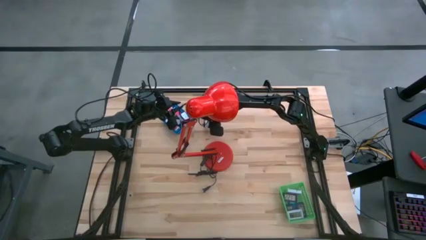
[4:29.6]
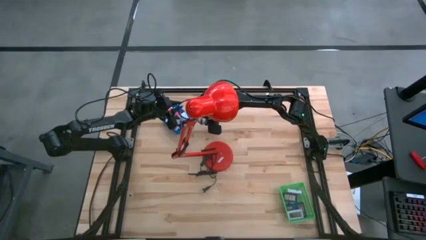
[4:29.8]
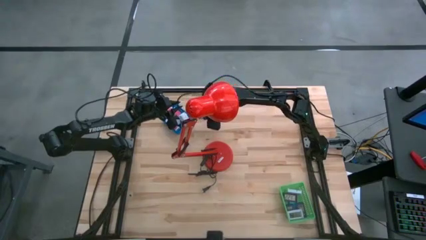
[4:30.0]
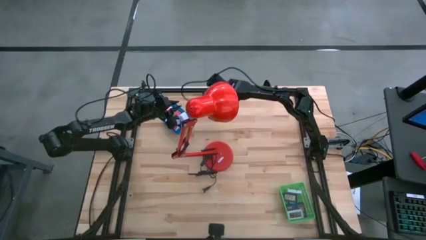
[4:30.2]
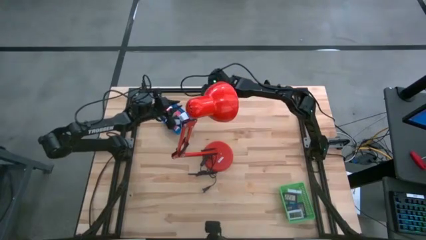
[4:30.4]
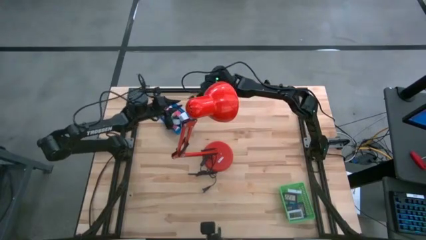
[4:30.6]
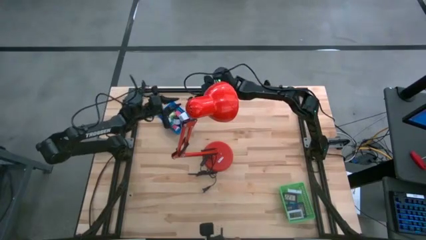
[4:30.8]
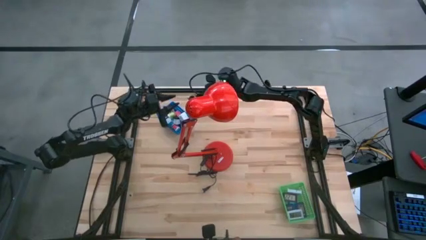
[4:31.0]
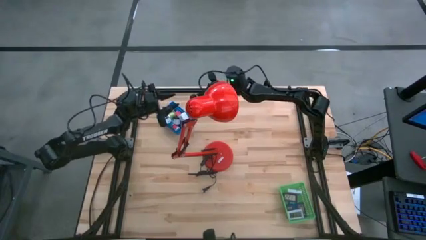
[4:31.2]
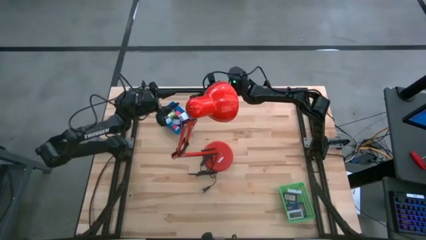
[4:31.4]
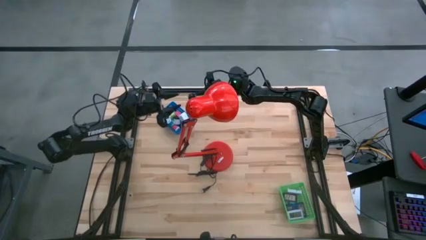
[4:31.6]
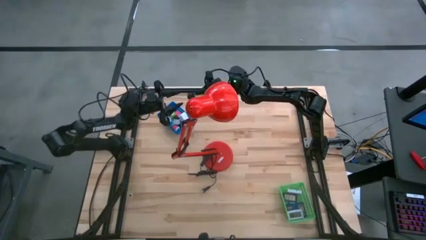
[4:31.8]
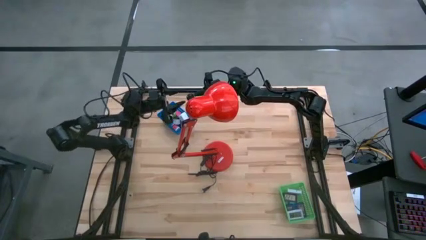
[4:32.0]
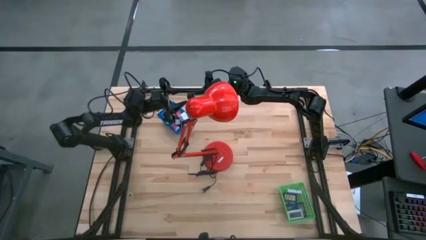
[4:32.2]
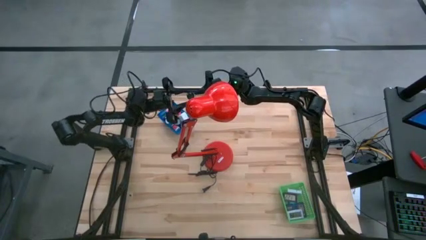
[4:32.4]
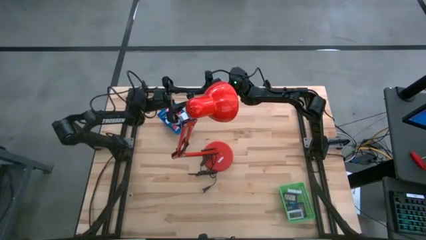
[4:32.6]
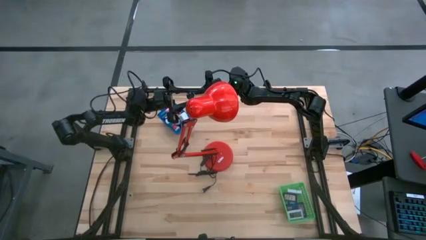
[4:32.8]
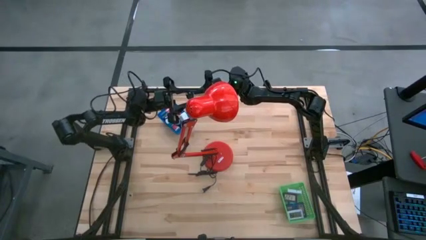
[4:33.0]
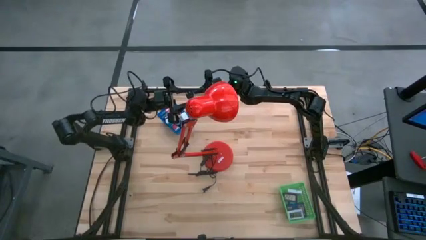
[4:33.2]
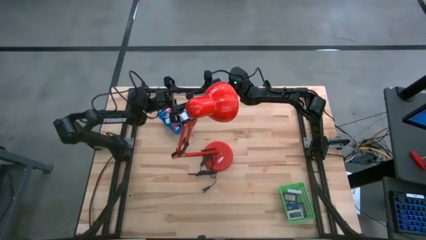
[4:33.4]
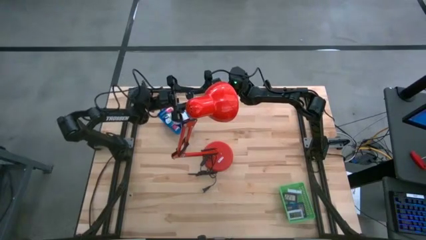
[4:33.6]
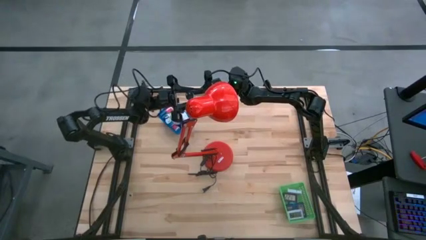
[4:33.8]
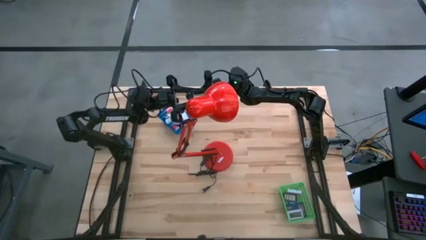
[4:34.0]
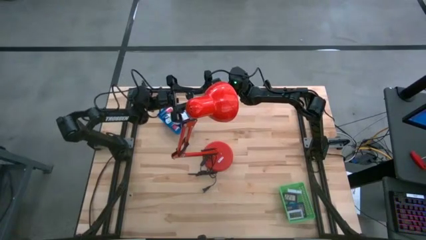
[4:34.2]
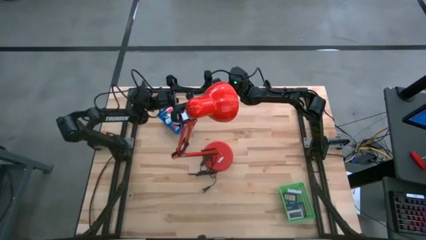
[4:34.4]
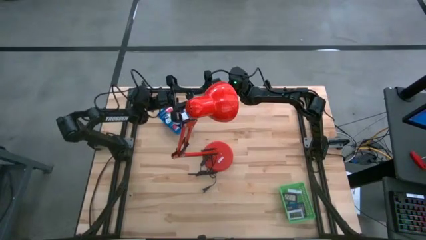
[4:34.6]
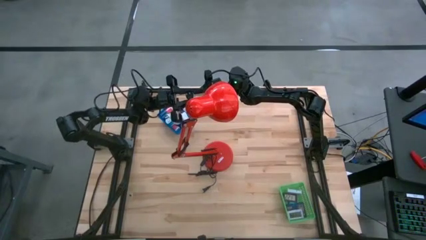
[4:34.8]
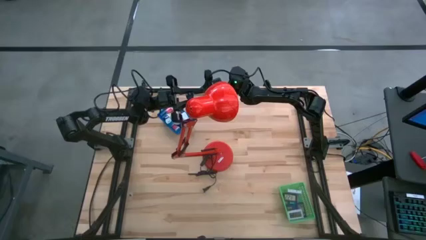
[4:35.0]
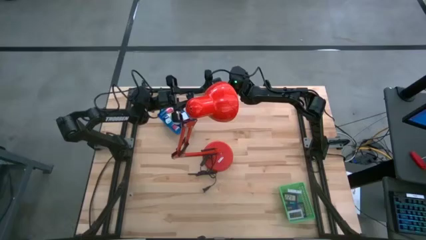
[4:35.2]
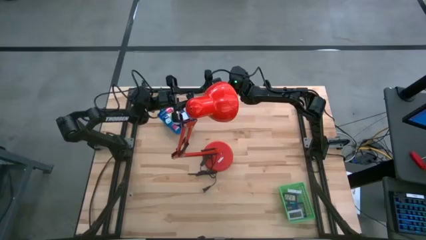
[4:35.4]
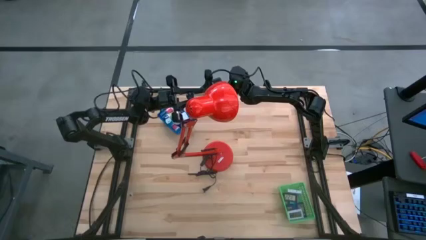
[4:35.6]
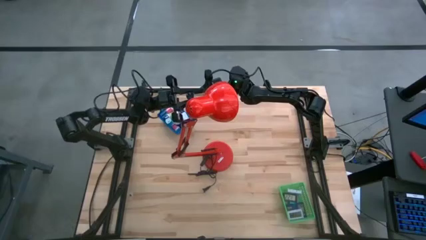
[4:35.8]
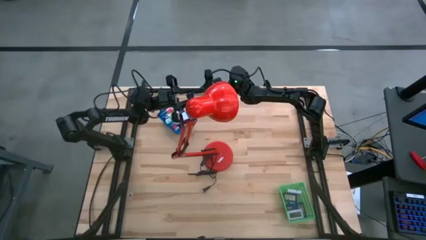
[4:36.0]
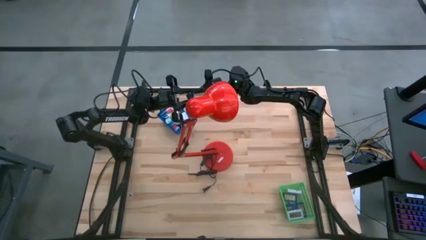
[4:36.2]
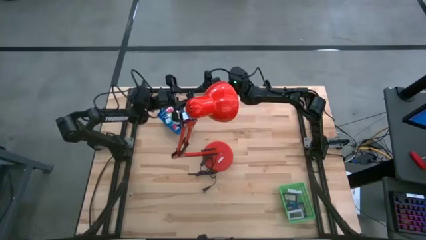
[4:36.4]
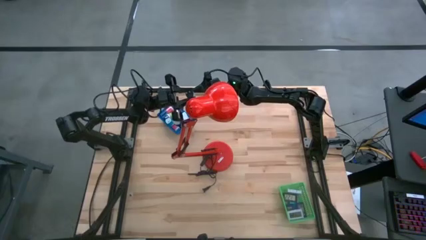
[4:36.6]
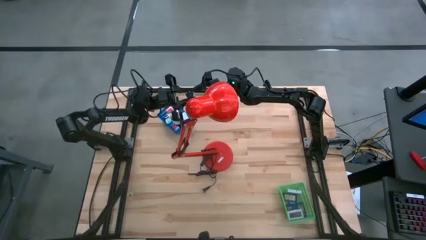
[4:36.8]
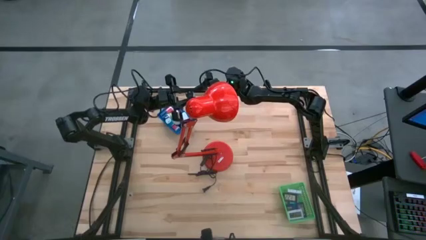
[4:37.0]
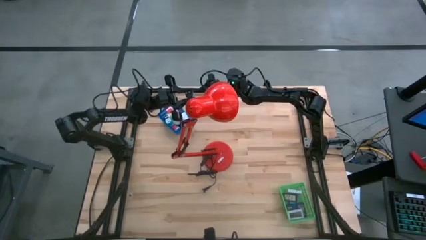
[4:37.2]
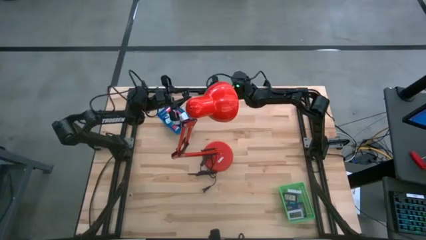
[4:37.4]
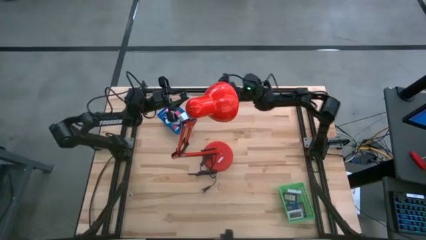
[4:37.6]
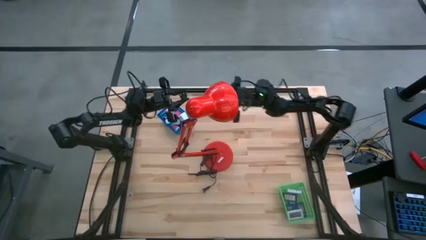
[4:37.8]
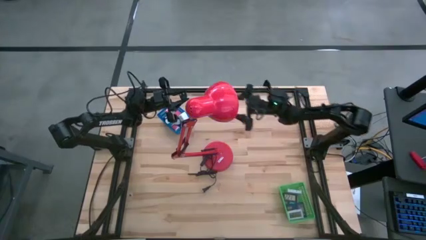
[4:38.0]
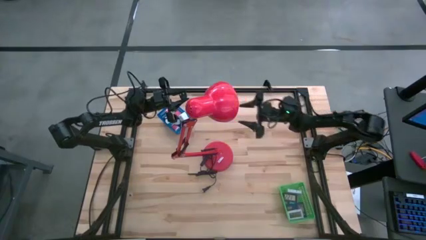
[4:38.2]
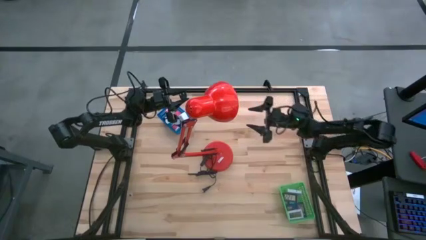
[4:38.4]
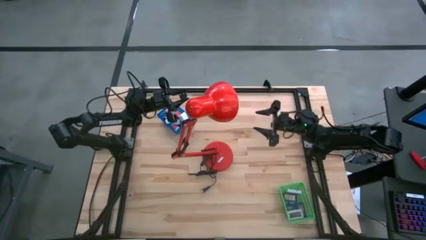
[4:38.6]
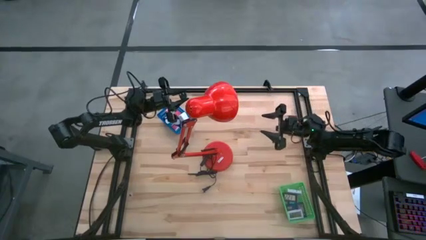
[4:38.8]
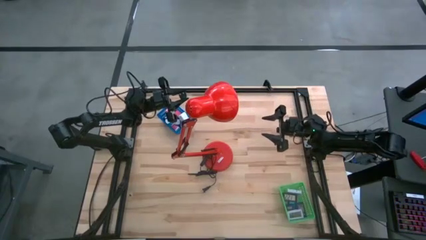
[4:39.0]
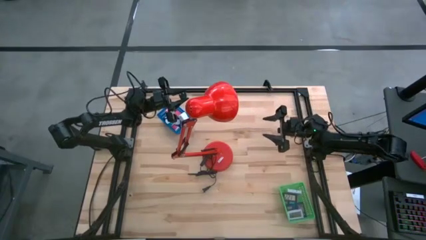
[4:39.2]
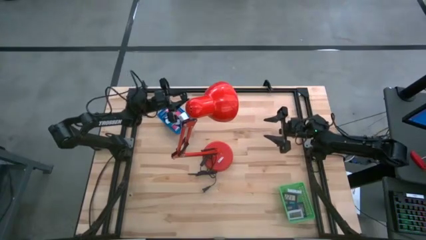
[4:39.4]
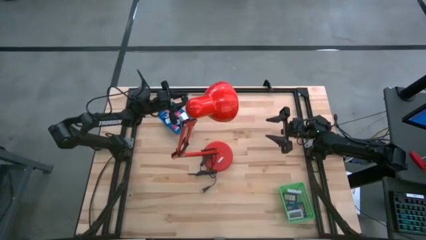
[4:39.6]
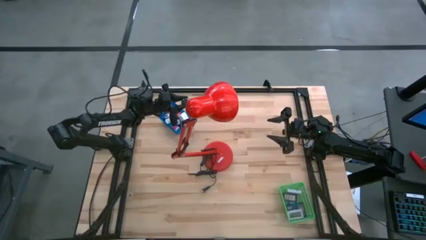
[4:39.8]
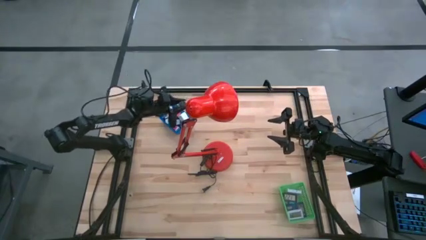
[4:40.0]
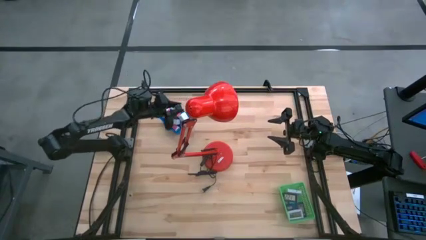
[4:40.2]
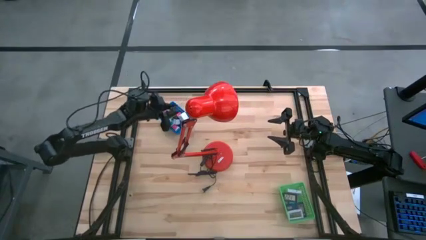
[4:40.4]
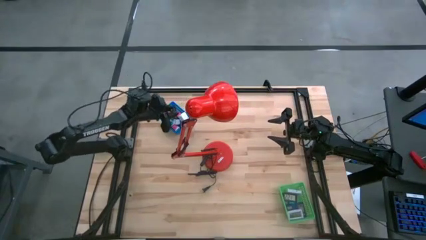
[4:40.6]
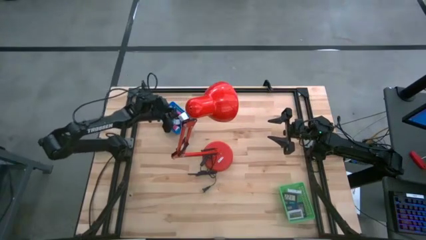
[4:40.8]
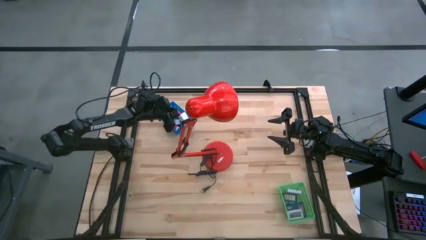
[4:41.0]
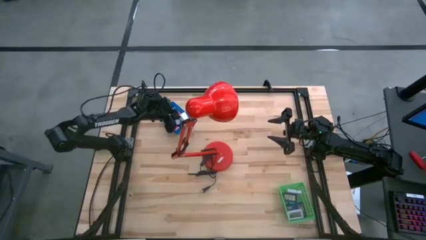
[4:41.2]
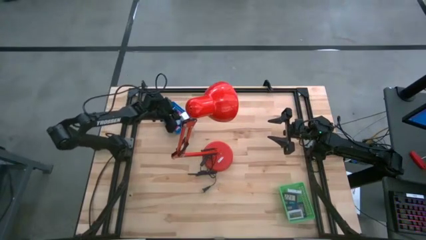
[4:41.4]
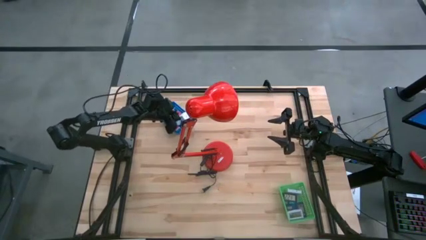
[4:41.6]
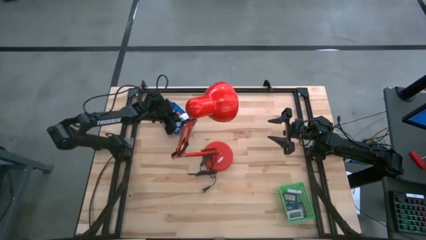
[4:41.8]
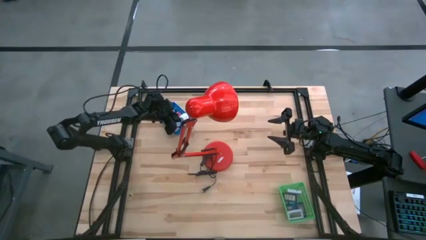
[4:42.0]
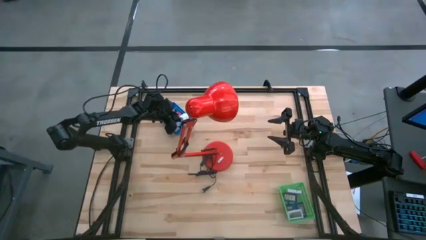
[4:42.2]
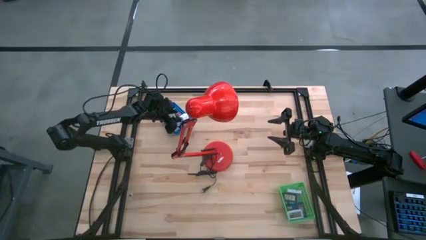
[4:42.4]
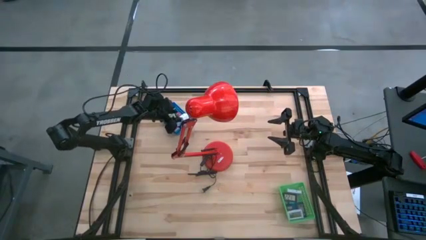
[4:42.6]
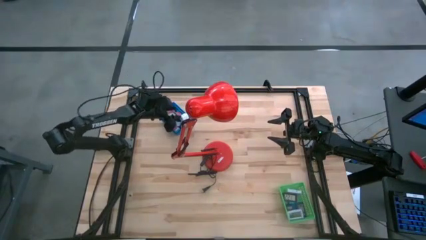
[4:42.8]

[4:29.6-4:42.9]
Task: Pick & Place Office items
Put the white black charger adapter into the blue bin
